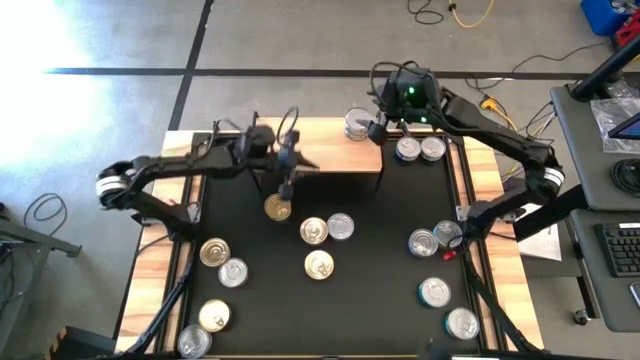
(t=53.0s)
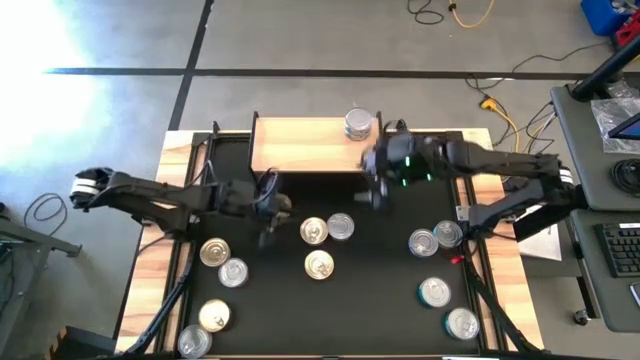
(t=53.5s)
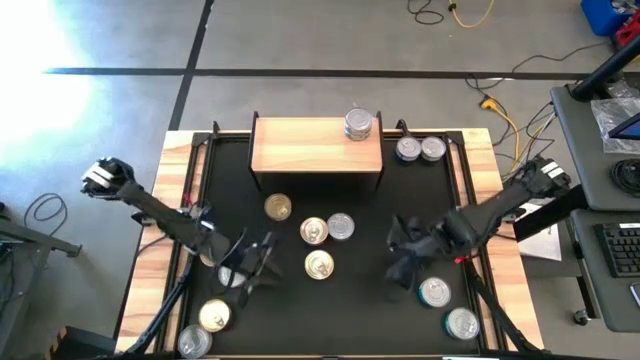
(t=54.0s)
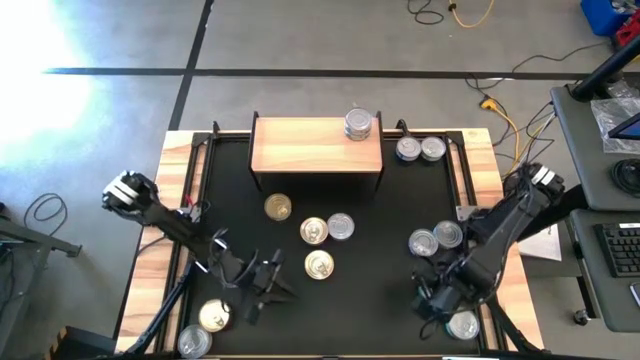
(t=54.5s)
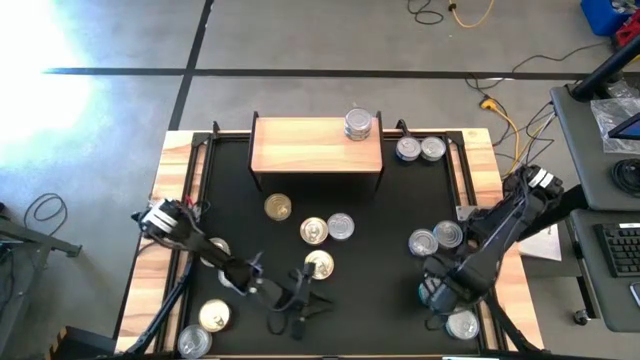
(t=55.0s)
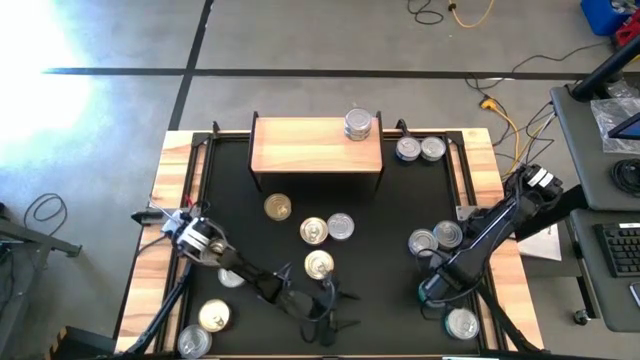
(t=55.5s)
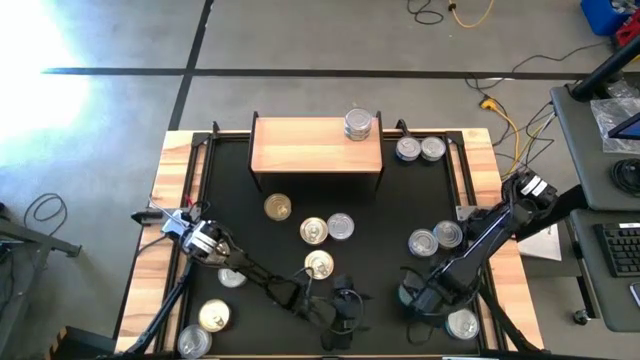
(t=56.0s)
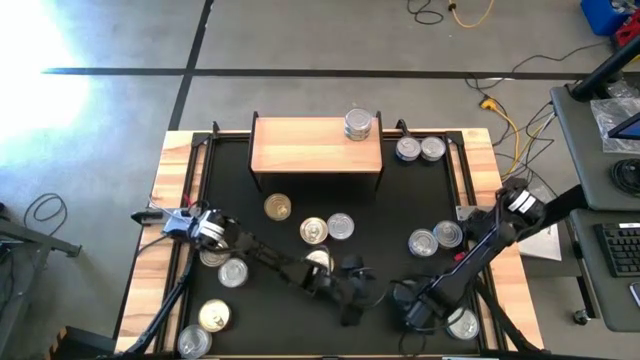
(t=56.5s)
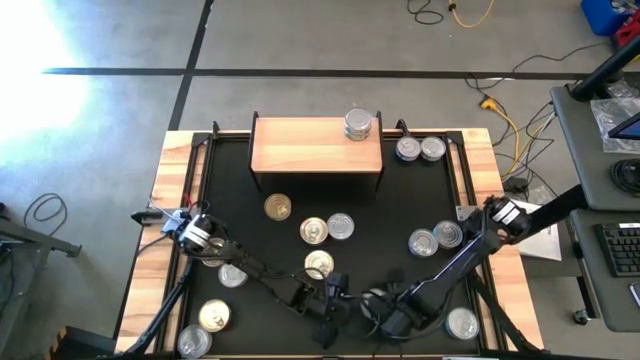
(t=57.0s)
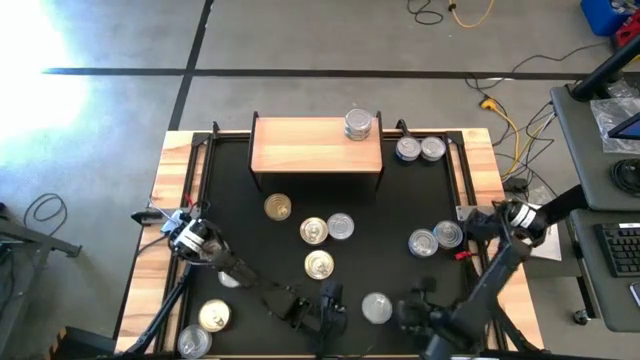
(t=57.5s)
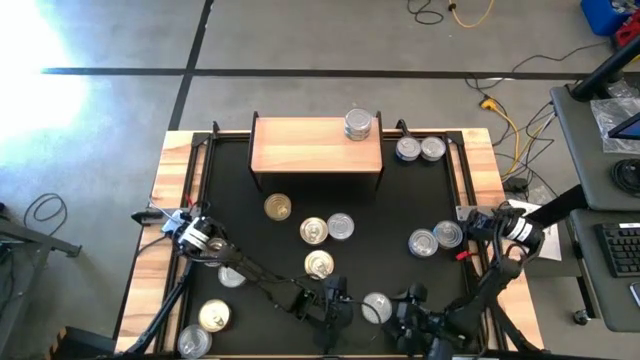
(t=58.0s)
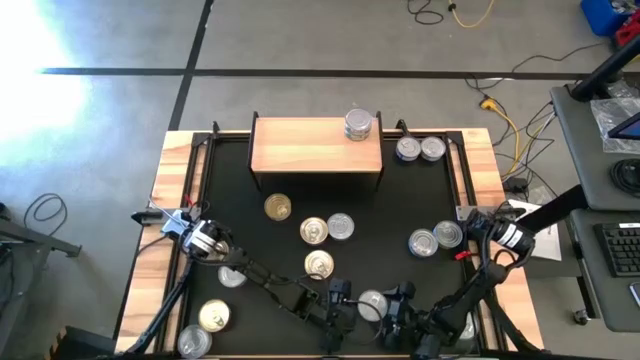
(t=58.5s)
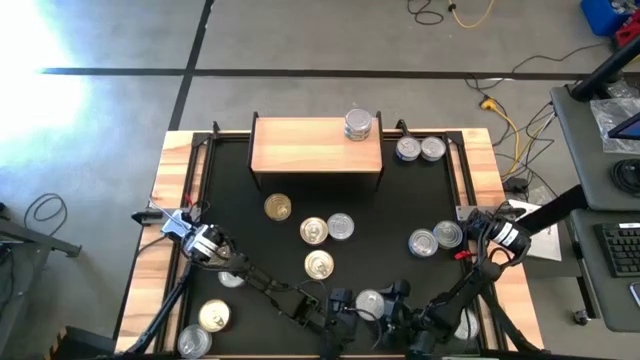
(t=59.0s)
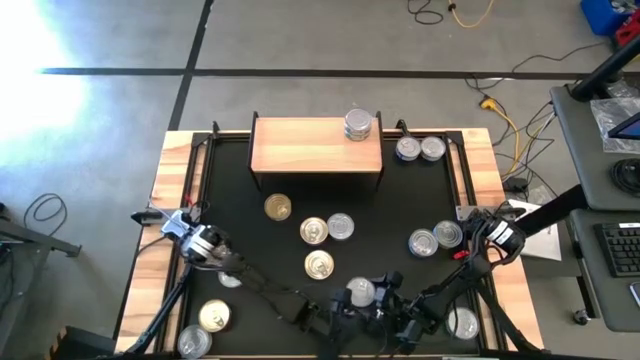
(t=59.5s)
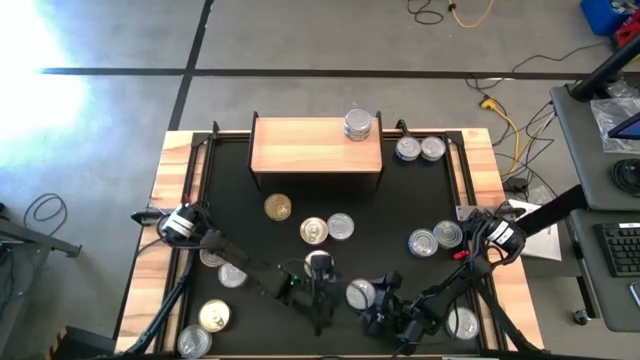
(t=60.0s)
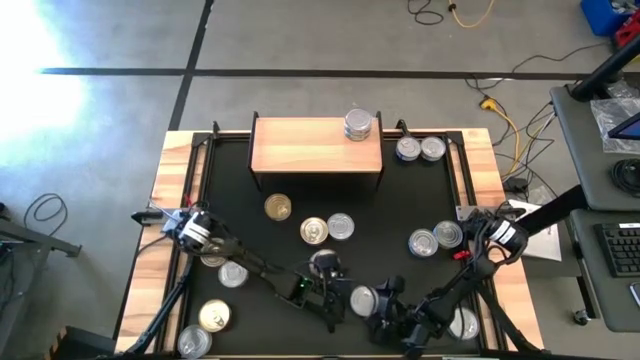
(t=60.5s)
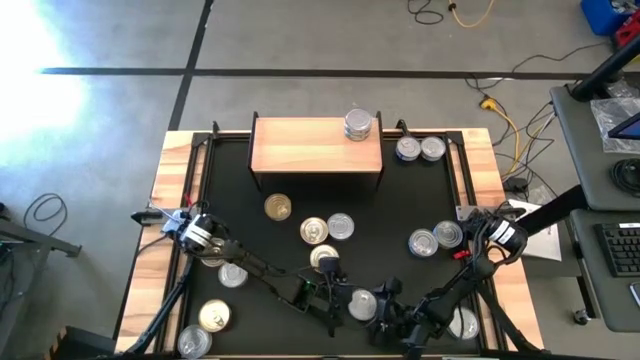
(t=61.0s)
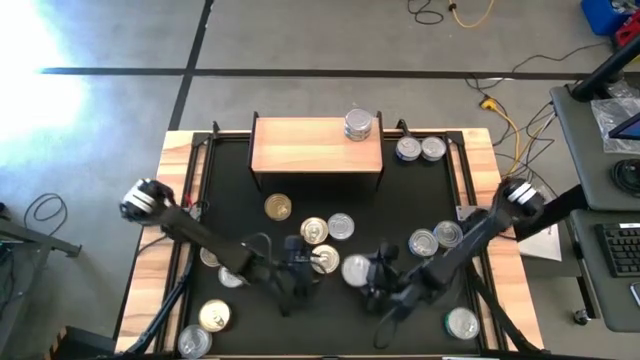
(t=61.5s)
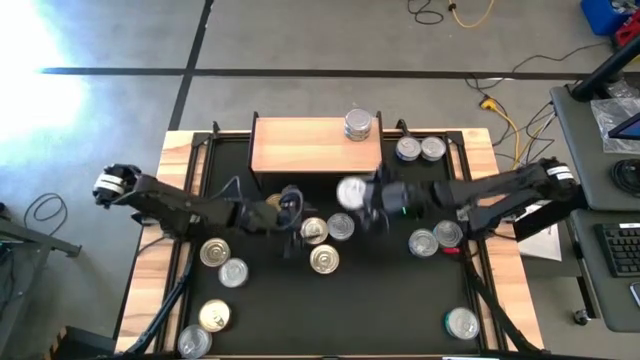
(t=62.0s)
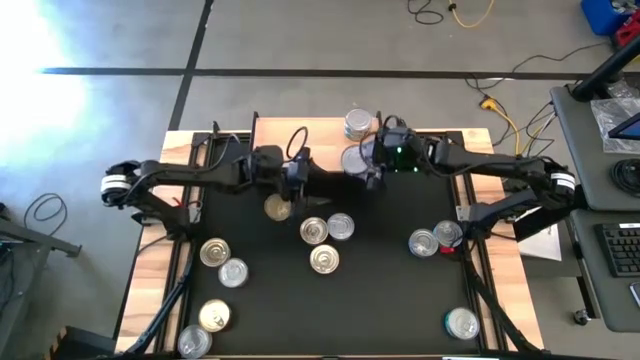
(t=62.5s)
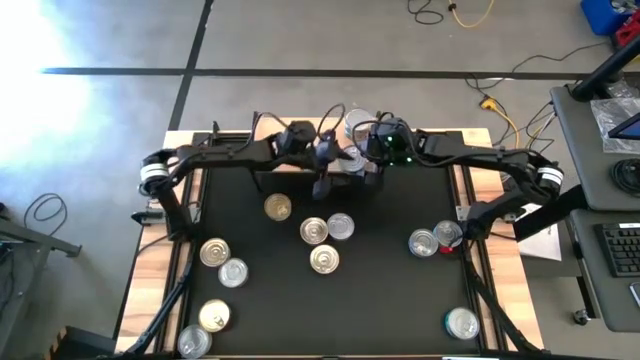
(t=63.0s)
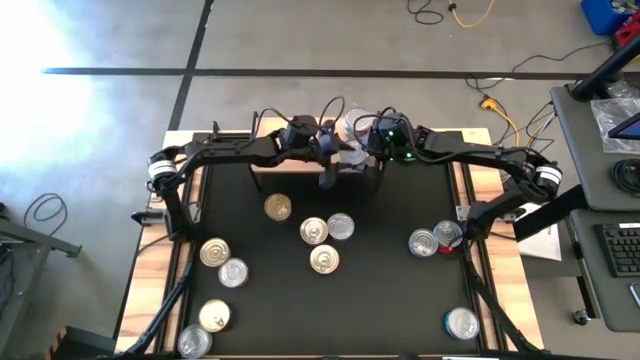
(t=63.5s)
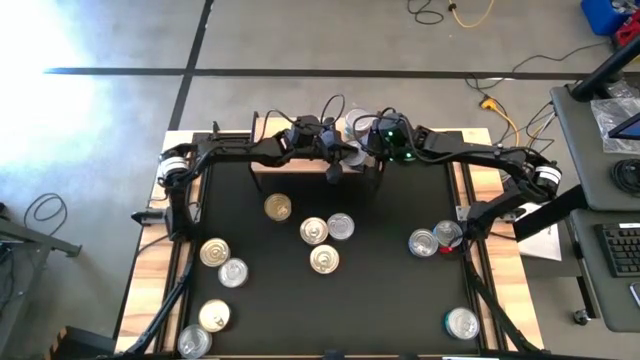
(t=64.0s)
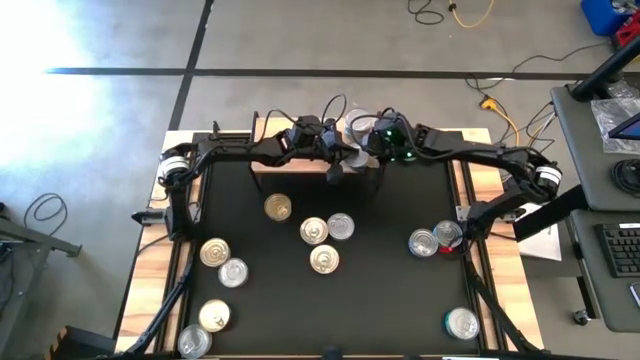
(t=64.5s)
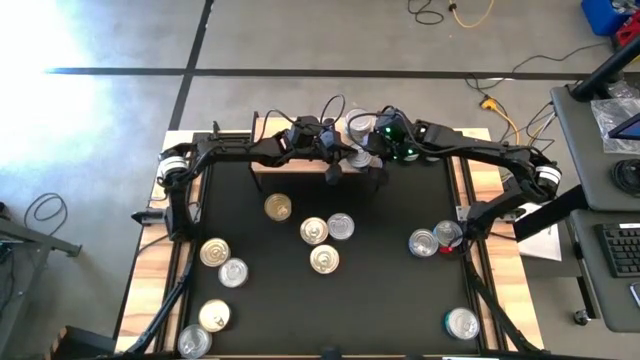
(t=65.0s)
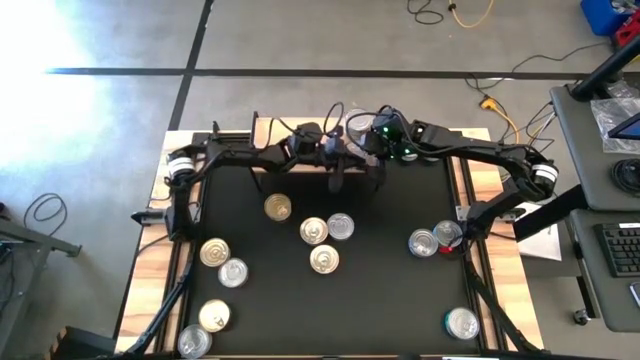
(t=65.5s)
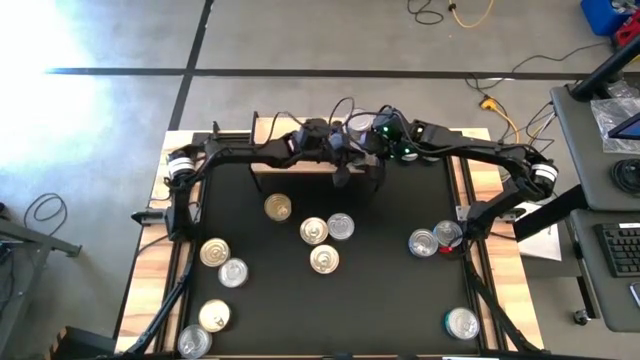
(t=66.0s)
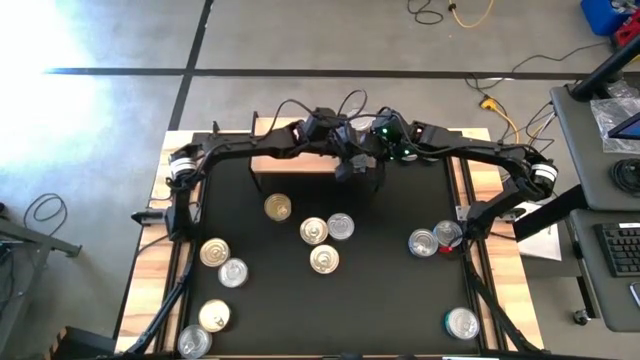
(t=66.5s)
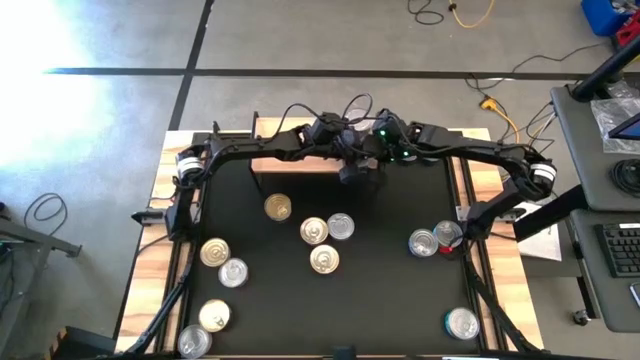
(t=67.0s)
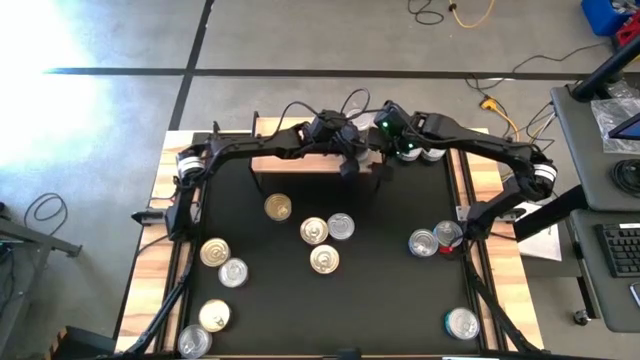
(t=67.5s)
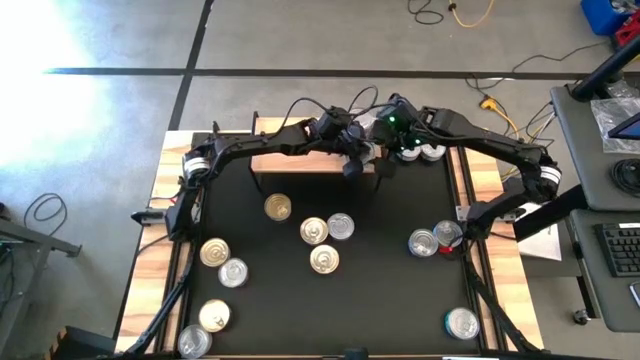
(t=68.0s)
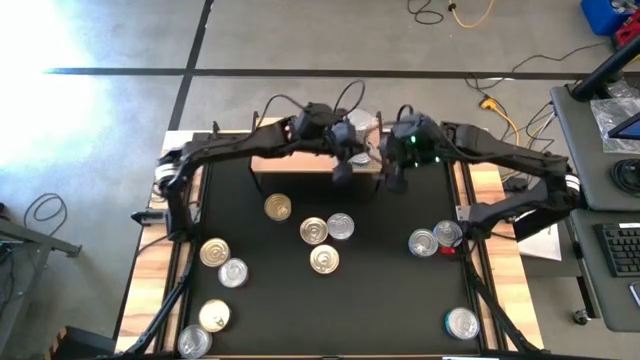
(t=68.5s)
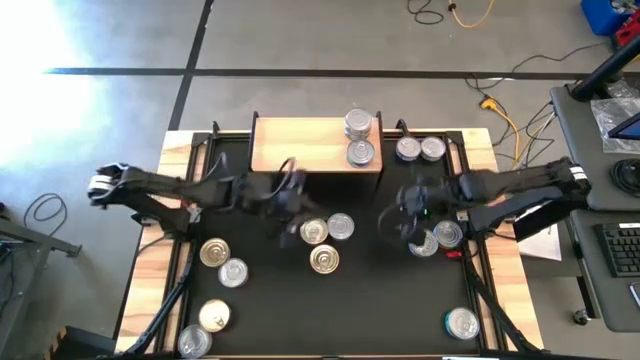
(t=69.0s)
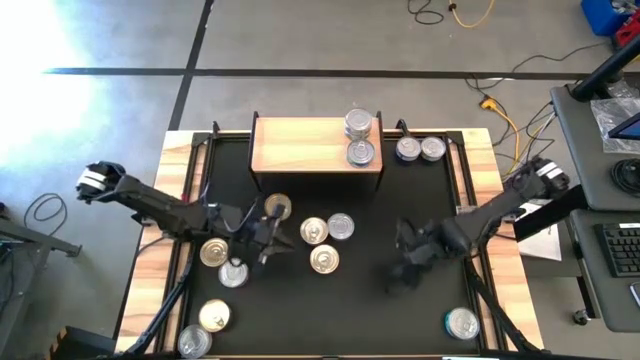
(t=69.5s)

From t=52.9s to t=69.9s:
Task: Stack canned seafood by type on shelf
Put the light blue tuna can on the shelf

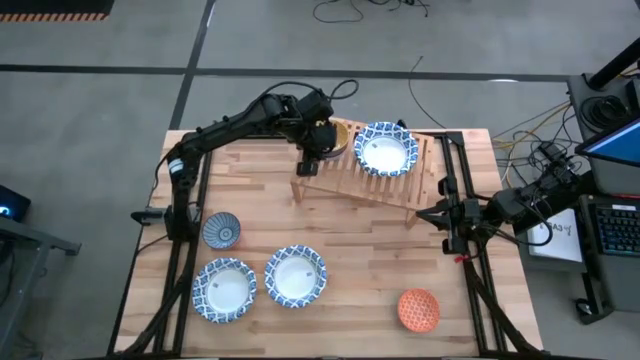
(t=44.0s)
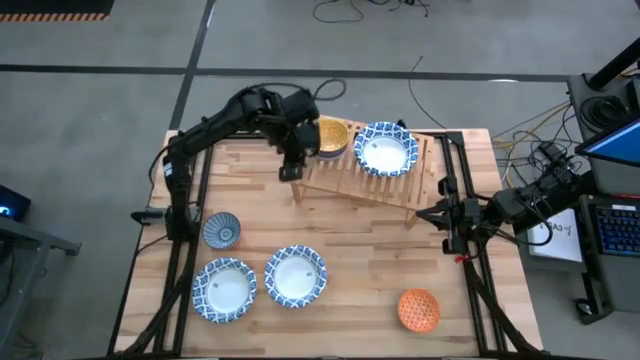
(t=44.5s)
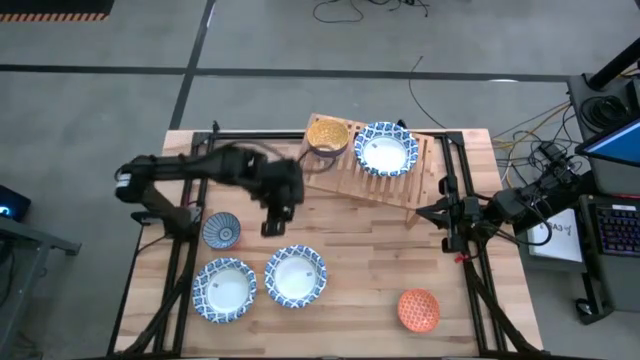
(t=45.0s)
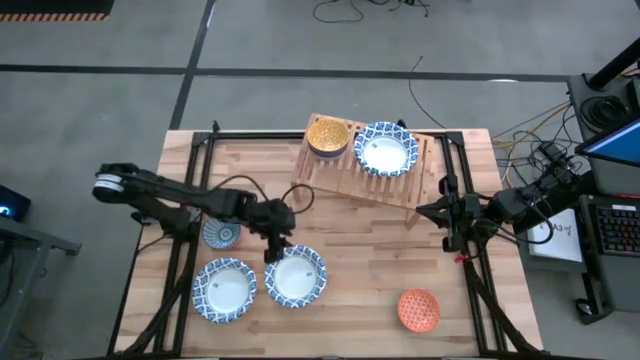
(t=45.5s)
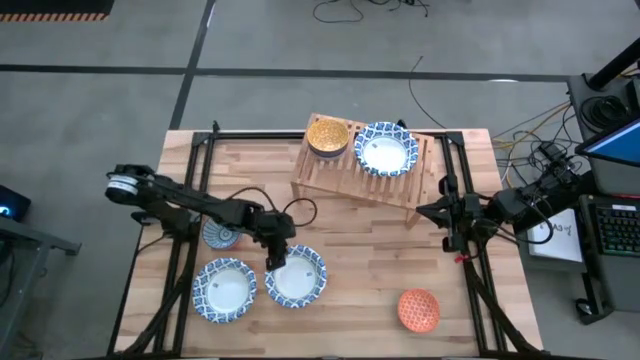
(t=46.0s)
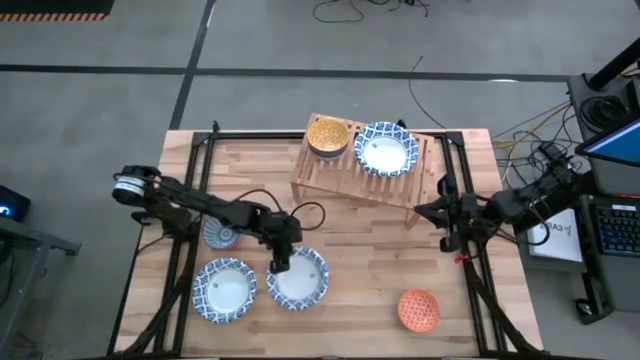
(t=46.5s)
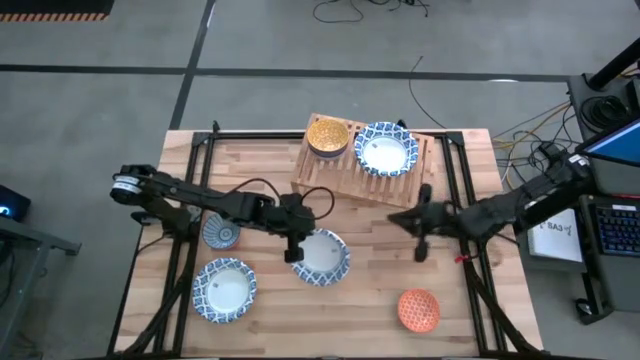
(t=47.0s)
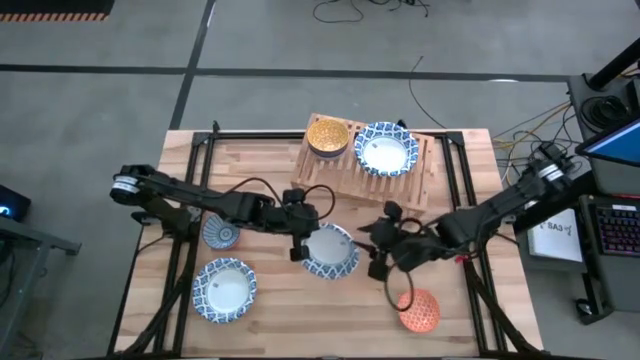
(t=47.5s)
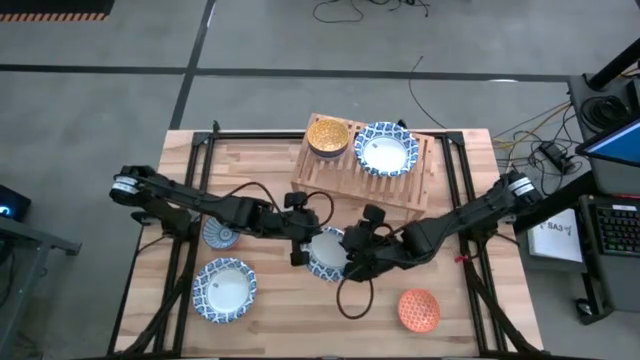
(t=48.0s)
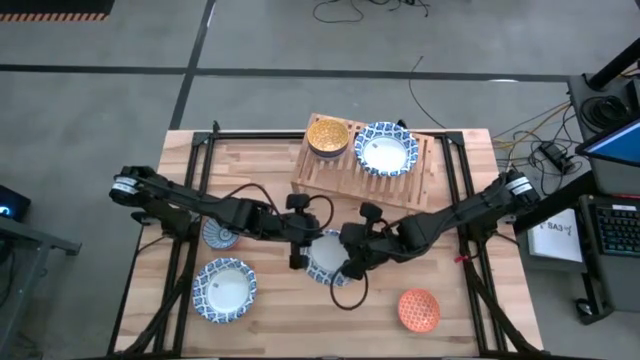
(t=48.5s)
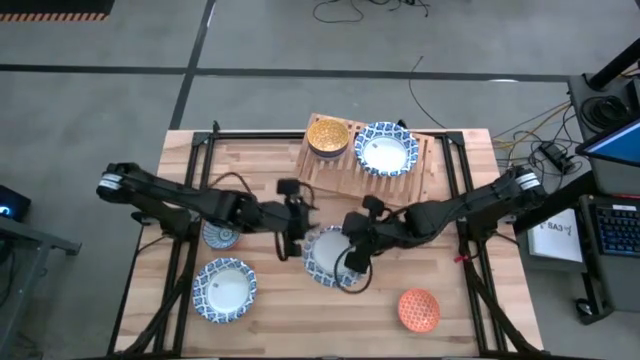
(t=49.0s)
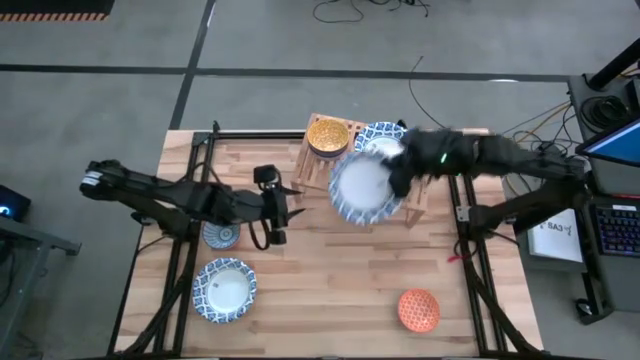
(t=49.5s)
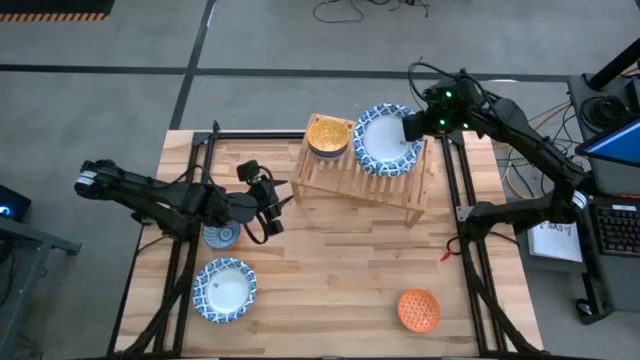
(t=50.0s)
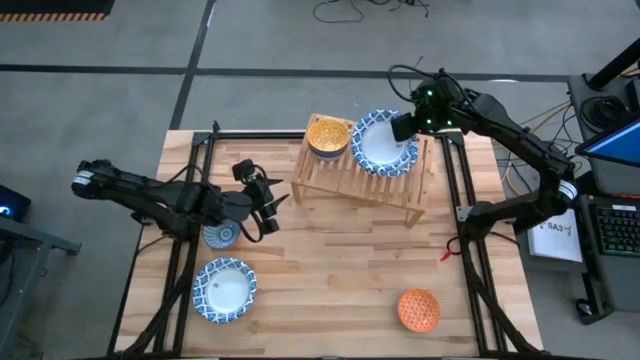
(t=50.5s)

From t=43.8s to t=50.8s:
Task: Place and stack bowls onto a shelf
Stack the white pattern bowl on top of the other white pattern bowl on the shelf
